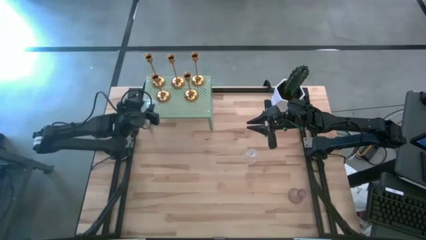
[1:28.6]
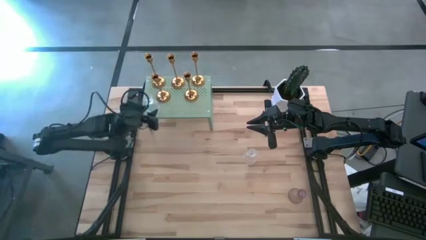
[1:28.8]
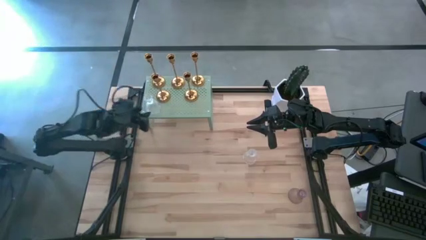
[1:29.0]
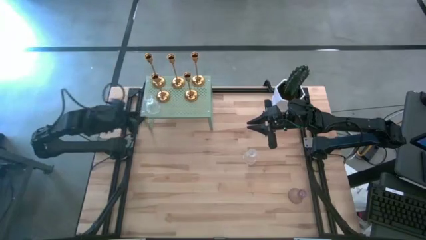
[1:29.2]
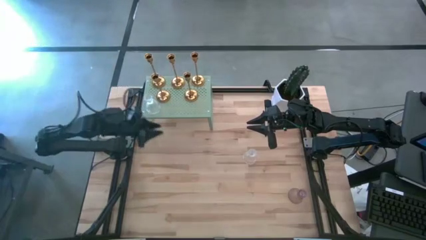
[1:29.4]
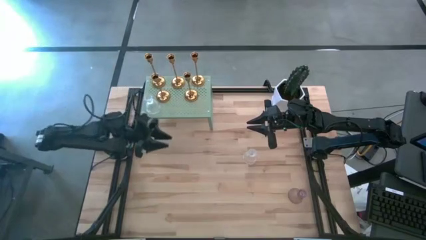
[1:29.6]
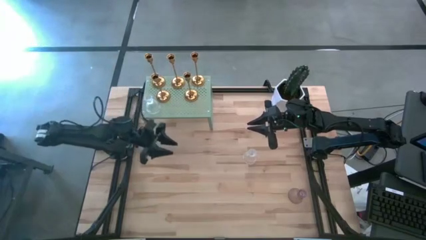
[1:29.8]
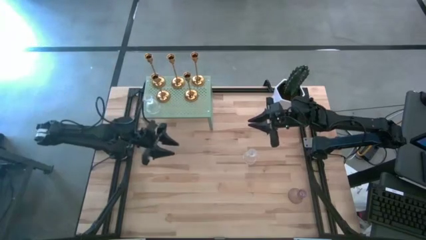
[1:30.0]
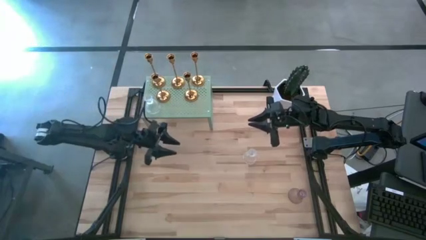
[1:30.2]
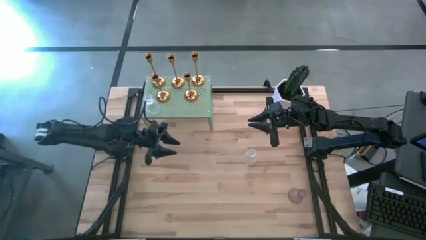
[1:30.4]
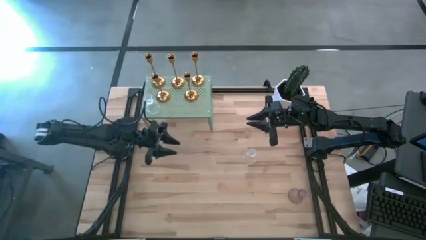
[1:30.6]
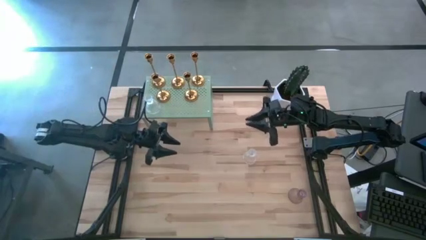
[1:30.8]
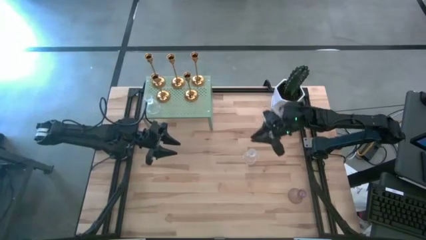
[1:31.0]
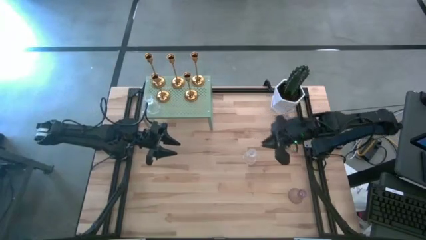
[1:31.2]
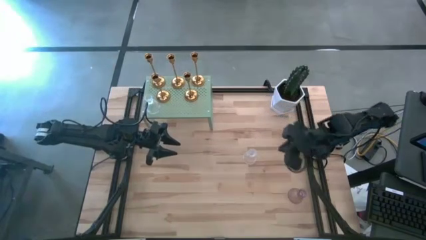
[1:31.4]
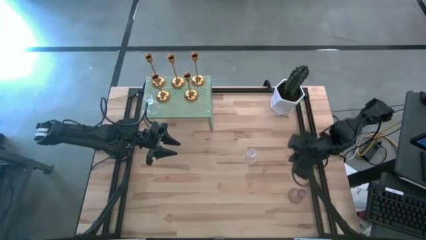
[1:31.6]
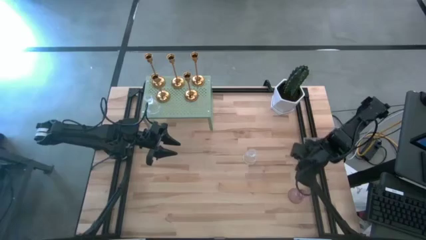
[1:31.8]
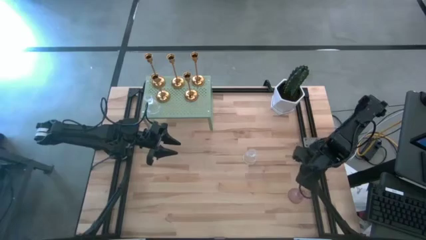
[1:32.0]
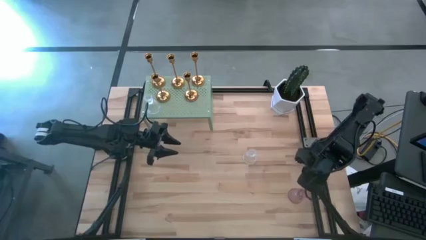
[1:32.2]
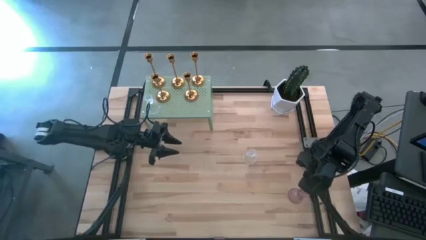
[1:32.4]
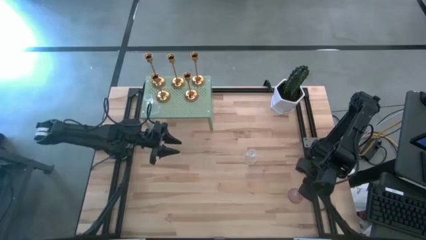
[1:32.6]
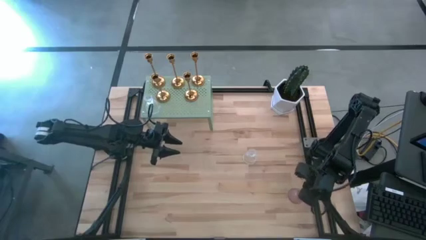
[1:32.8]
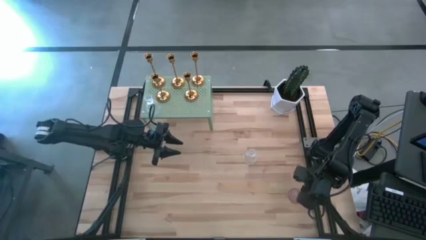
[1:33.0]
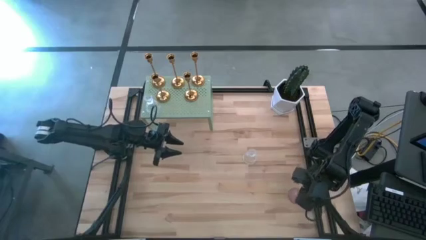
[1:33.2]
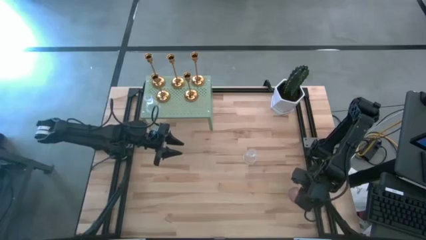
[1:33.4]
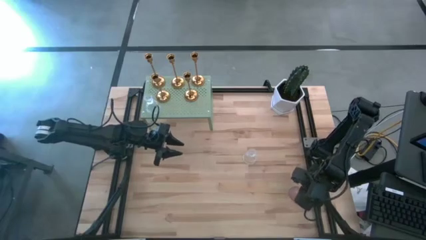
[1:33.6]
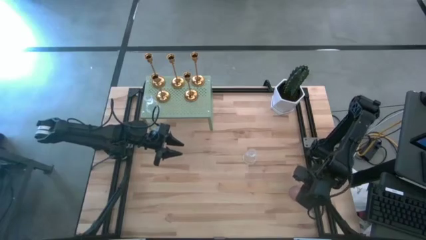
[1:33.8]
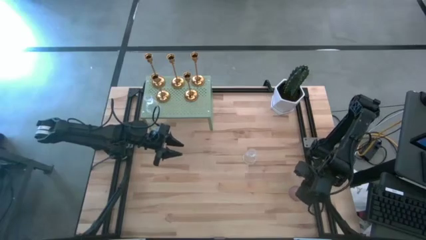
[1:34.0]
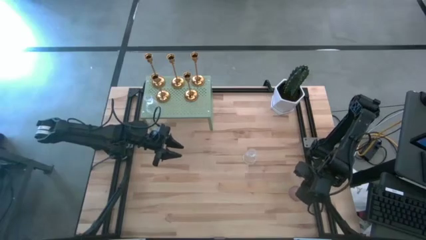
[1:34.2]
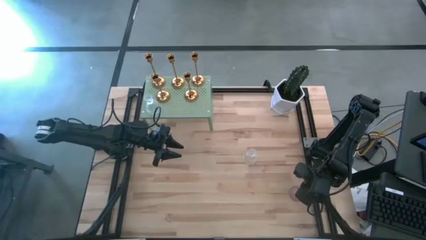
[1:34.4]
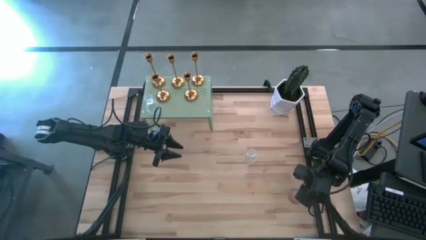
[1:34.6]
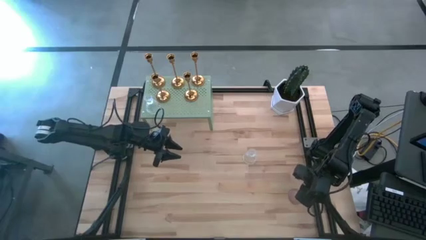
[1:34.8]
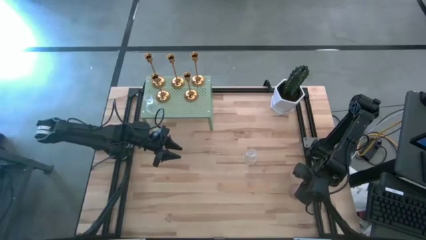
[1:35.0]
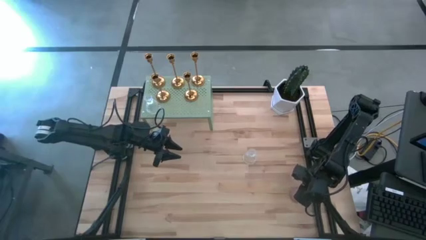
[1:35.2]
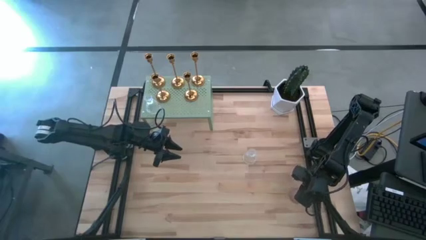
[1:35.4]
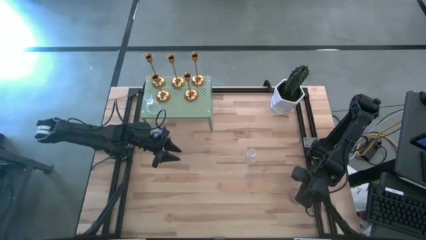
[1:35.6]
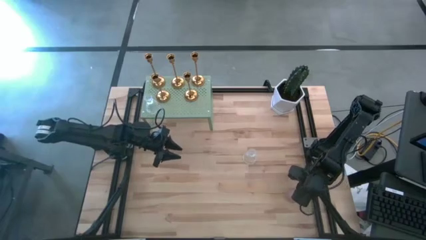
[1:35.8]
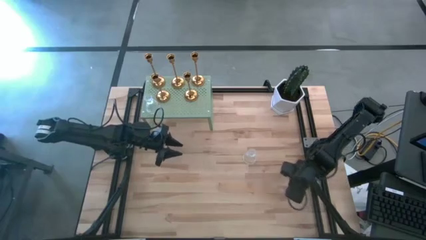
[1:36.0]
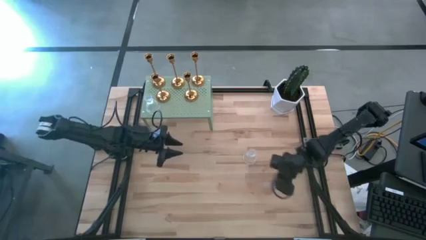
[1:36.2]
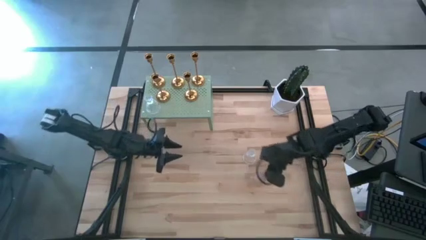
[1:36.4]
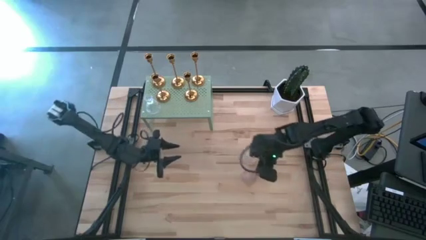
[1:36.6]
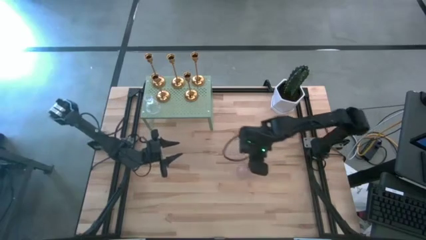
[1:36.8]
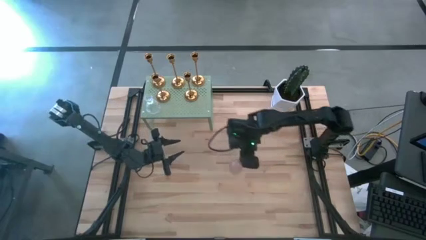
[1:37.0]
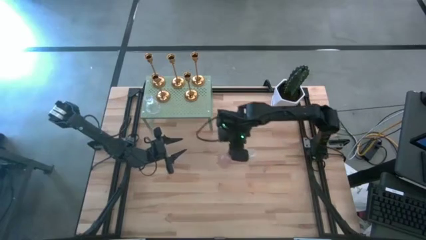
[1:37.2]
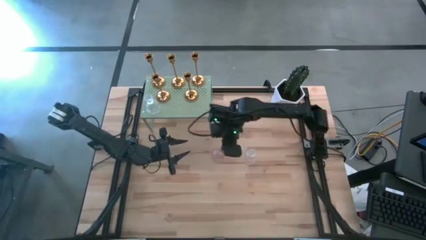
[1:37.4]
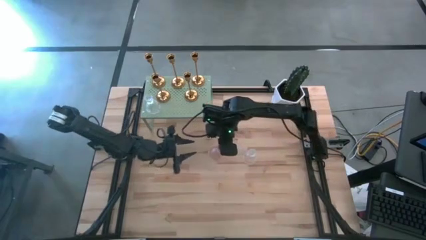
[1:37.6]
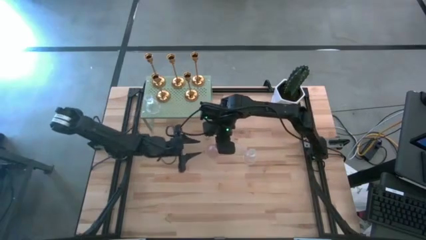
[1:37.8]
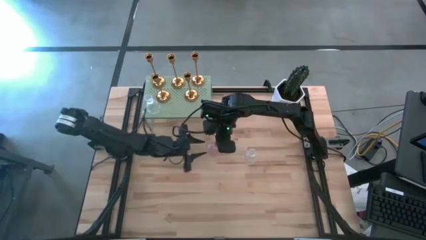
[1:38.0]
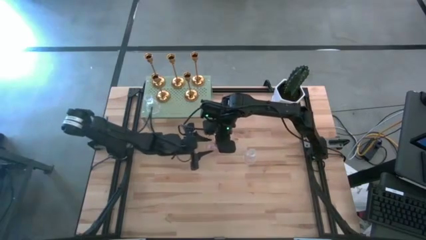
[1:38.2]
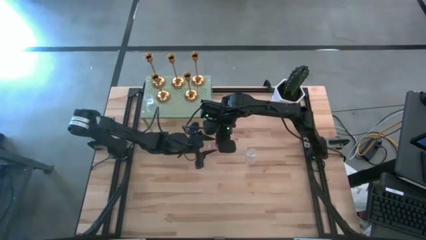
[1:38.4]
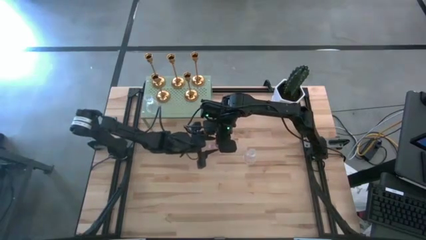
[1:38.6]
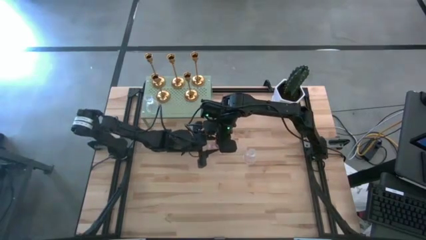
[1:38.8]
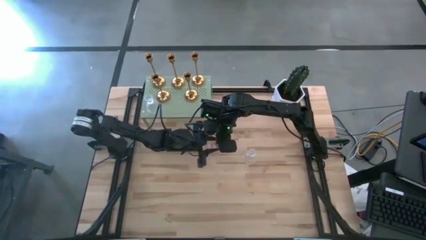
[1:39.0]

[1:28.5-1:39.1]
Task: Pick & Place candle stick holders
Put the purple glass candle holder on the shelf

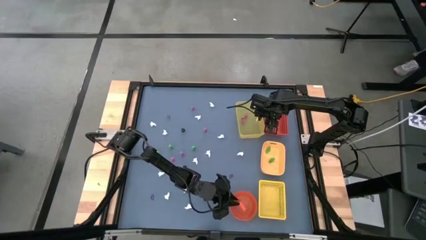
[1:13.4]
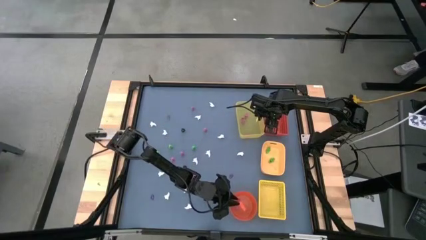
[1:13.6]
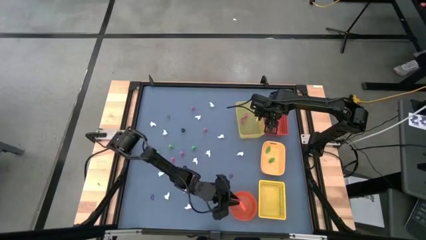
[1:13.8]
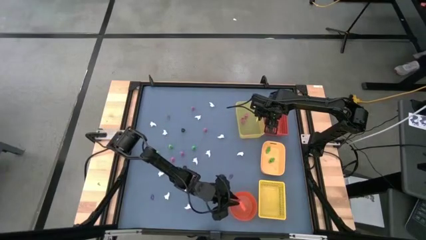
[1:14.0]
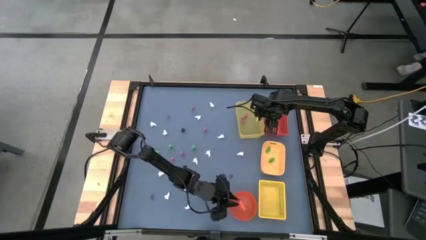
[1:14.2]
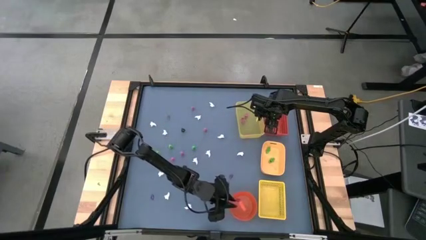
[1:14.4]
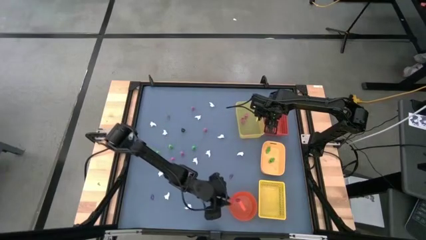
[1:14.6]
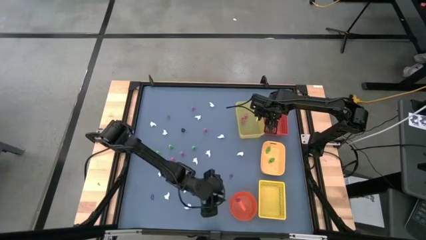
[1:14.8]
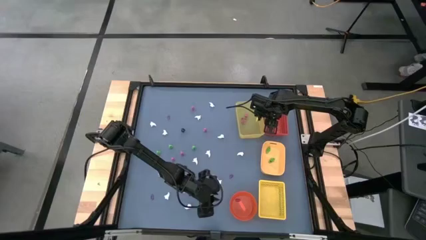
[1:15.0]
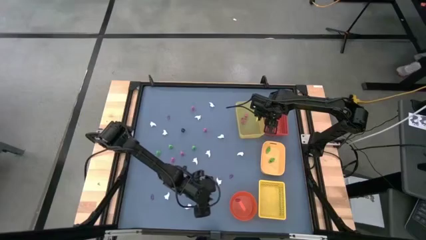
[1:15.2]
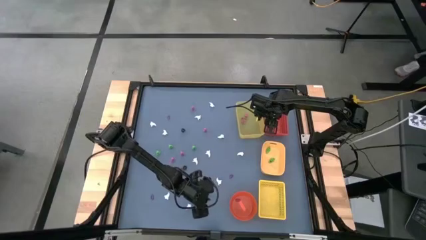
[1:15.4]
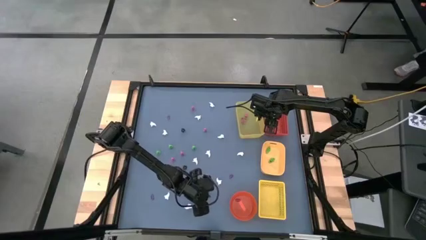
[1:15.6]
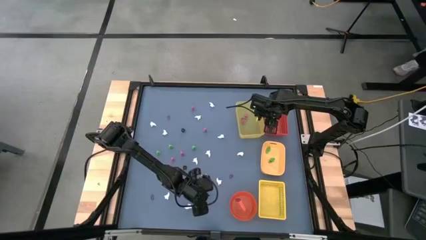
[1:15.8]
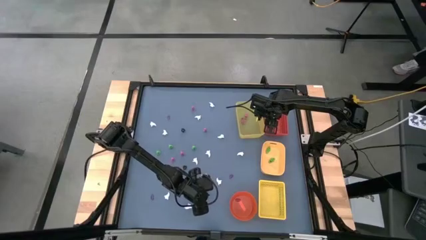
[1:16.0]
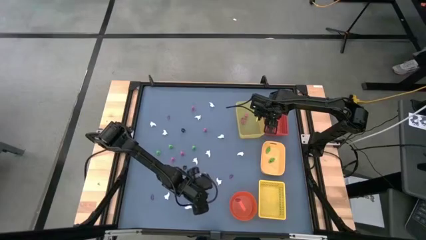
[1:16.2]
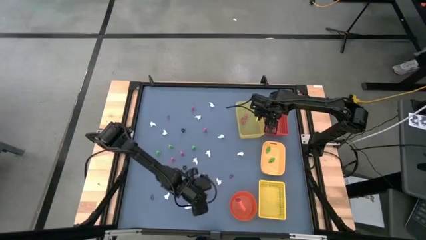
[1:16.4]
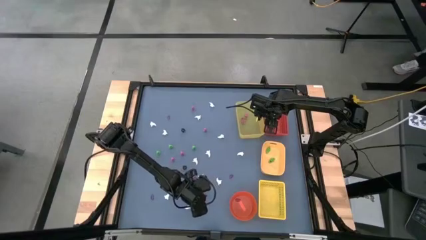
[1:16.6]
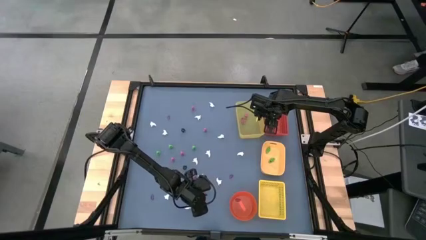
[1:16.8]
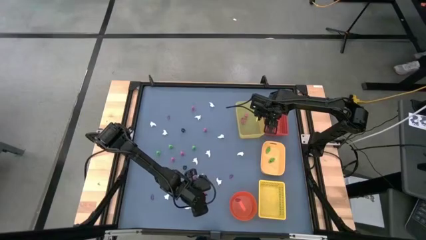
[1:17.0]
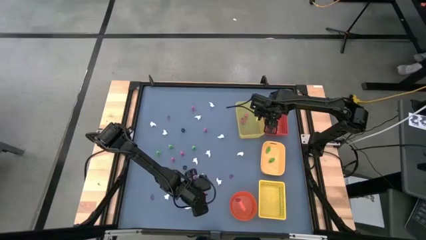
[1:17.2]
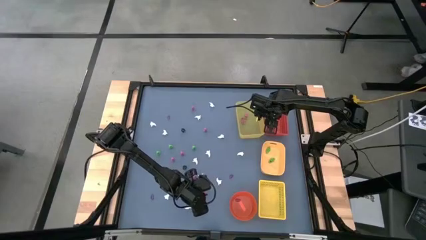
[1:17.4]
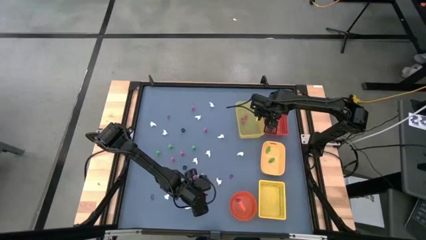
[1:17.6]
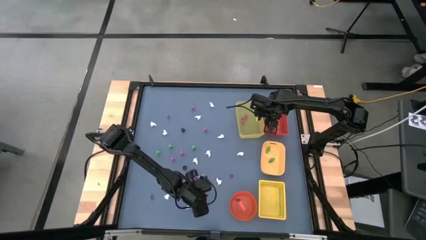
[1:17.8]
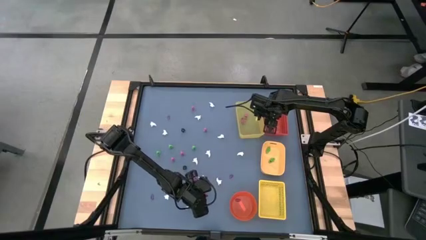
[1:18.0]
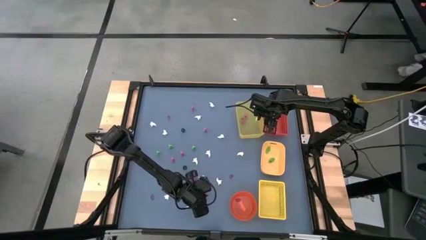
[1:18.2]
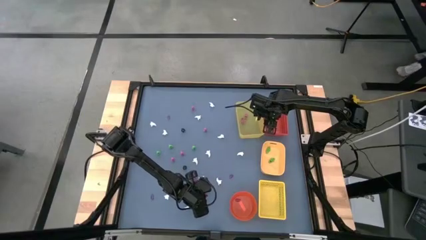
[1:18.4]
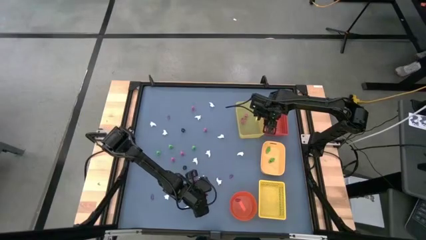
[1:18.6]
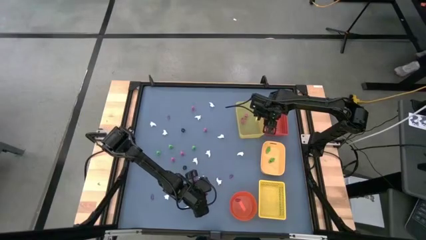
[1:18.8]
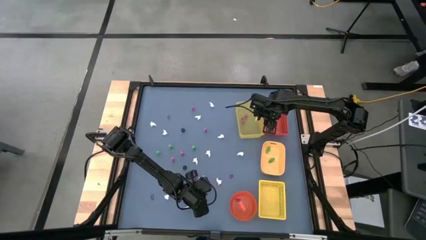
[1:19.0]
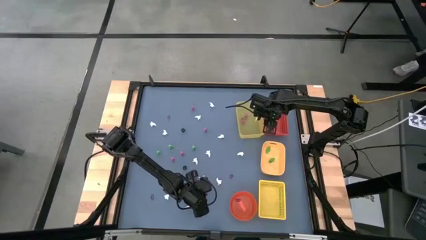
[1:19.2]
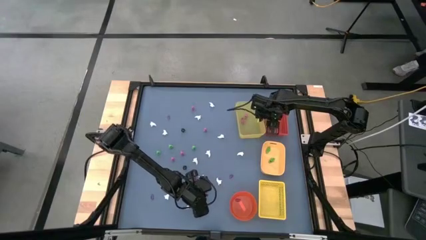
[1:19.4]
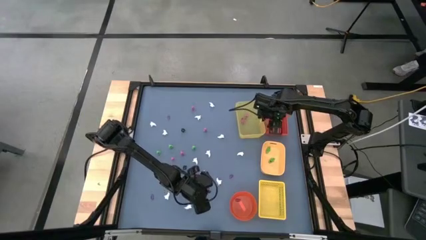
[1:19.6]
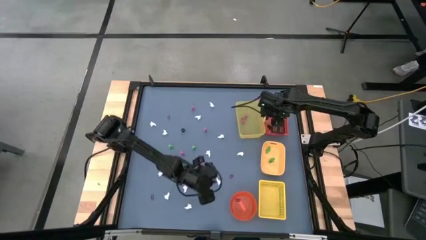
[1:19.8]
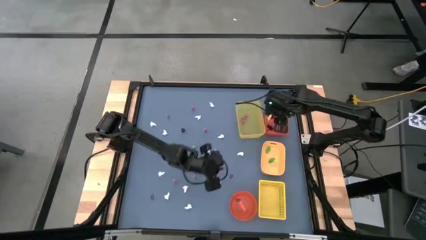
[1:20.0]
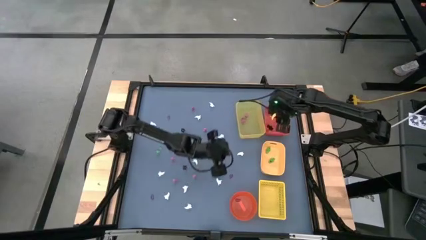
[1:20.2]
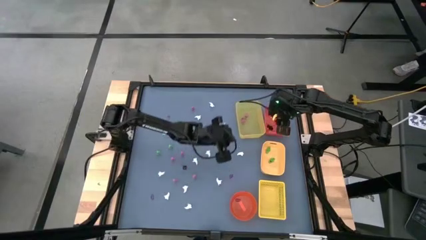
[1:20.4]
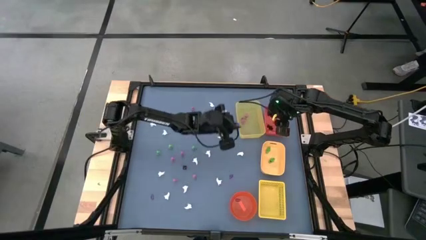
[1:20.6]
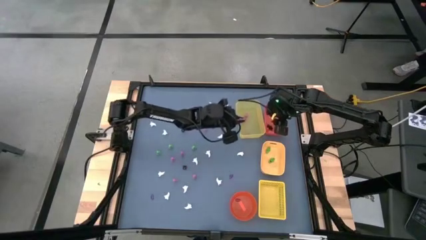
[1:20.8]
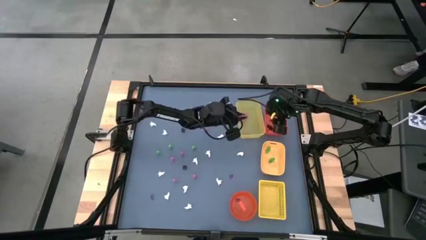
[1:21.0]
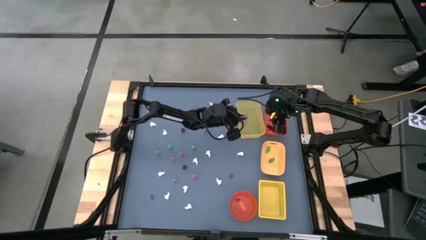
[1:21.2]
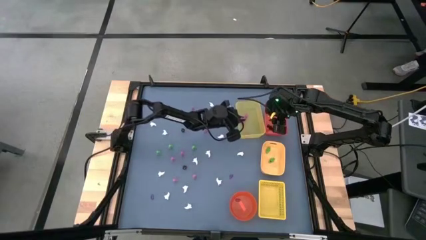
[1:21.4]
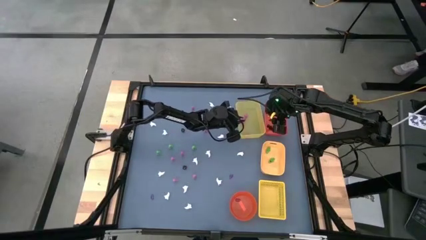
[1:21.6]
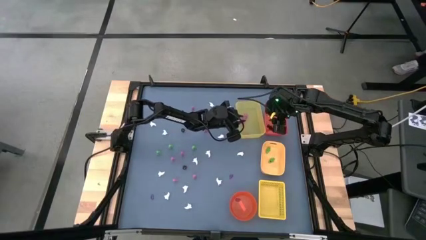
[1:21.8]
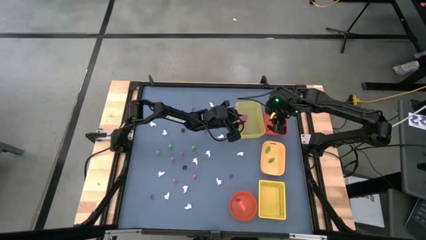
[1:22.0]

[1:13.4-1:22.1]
Task: Sort Halloween decoration
Put the pink skeleton toy into the top yellow bin
